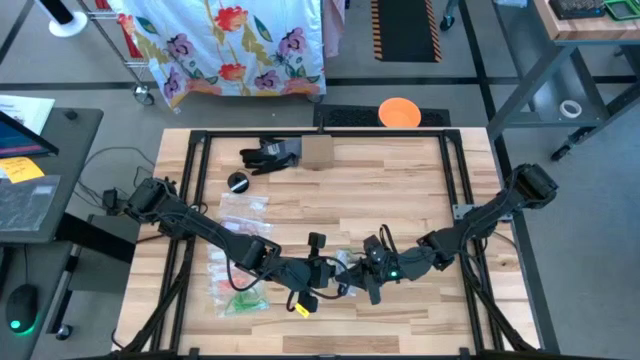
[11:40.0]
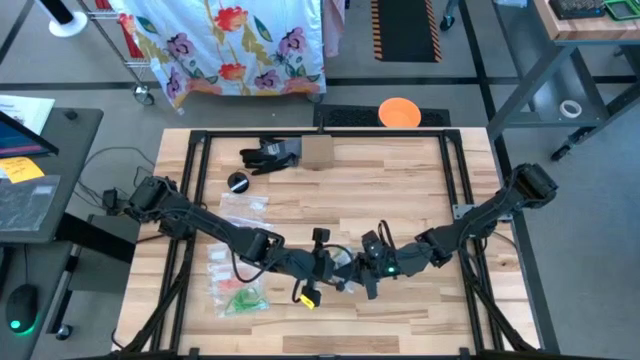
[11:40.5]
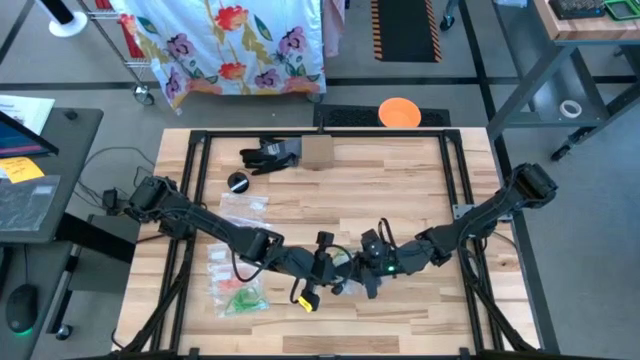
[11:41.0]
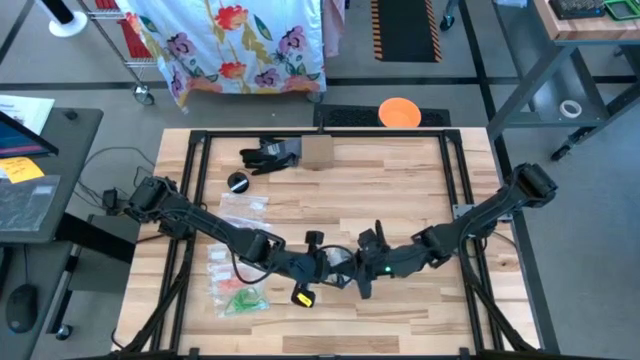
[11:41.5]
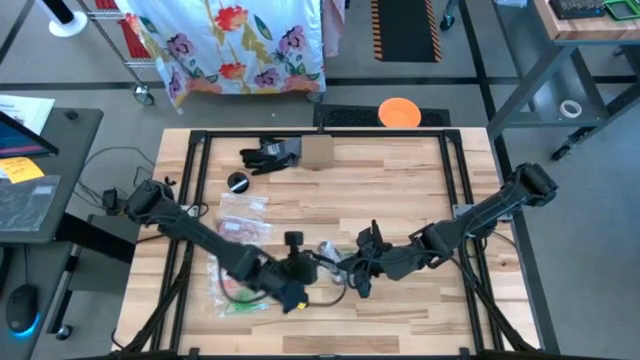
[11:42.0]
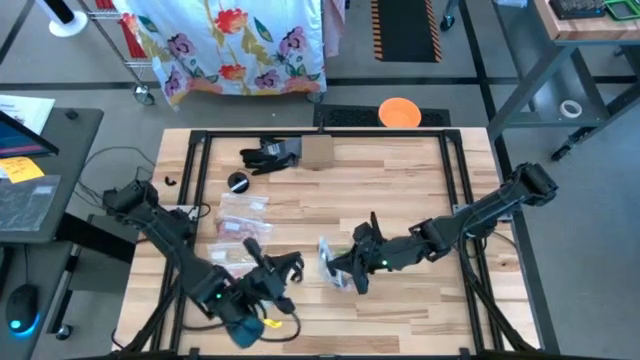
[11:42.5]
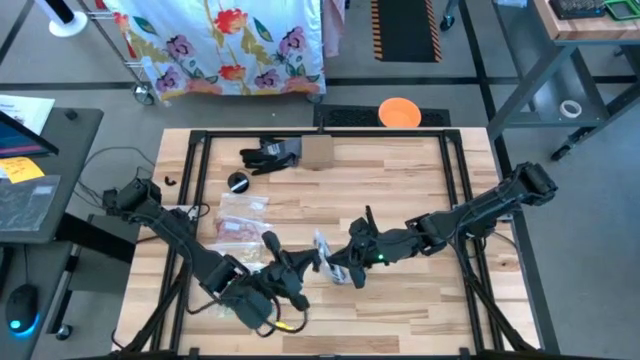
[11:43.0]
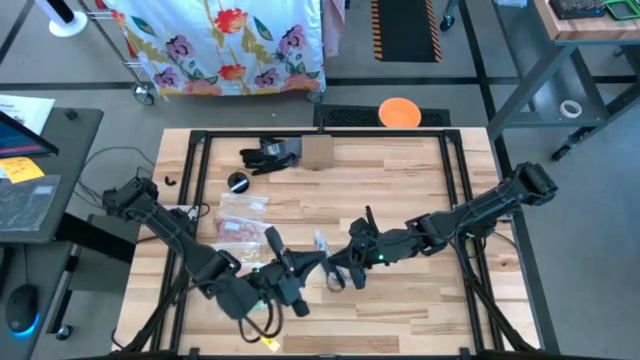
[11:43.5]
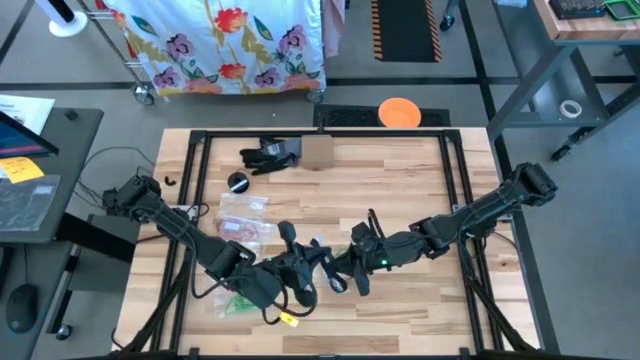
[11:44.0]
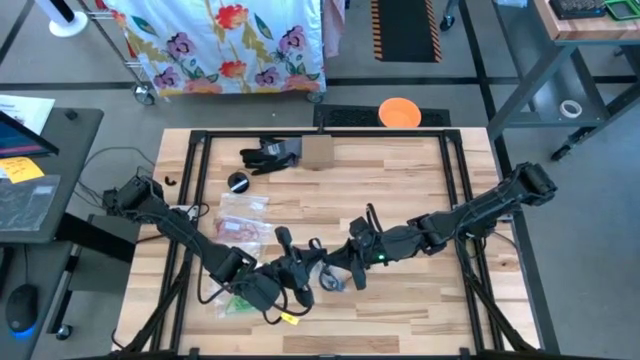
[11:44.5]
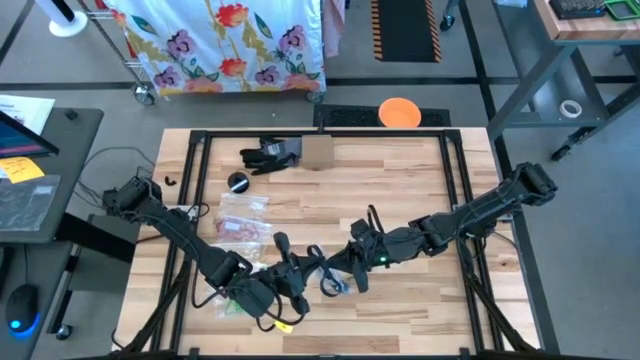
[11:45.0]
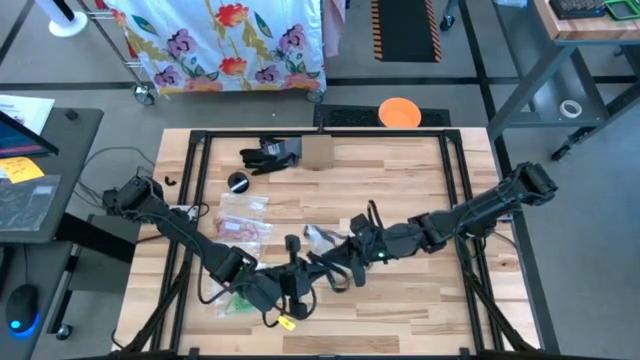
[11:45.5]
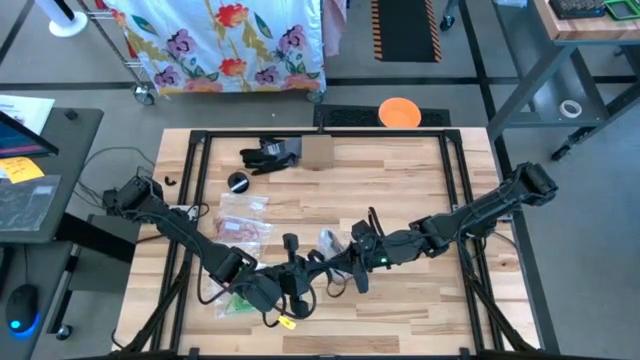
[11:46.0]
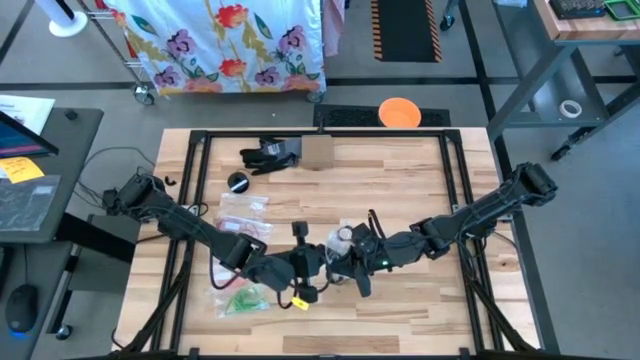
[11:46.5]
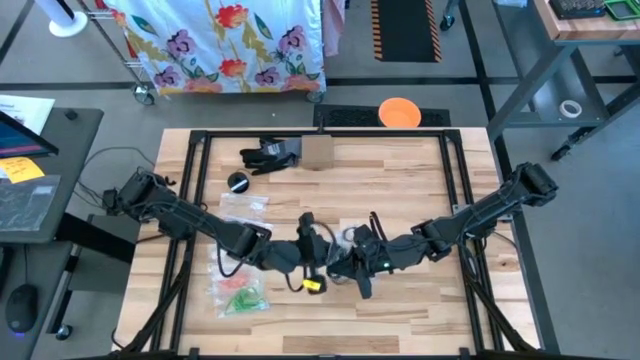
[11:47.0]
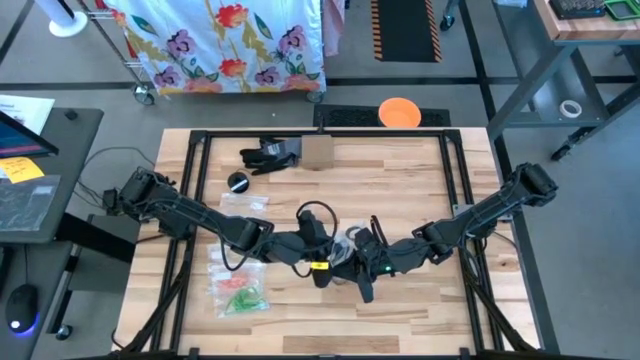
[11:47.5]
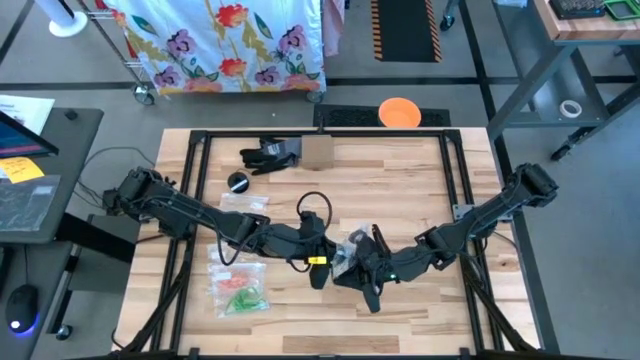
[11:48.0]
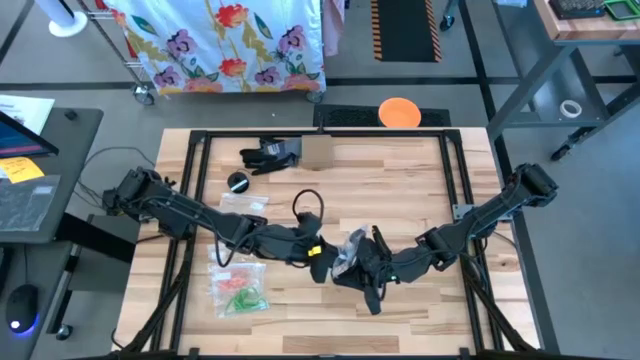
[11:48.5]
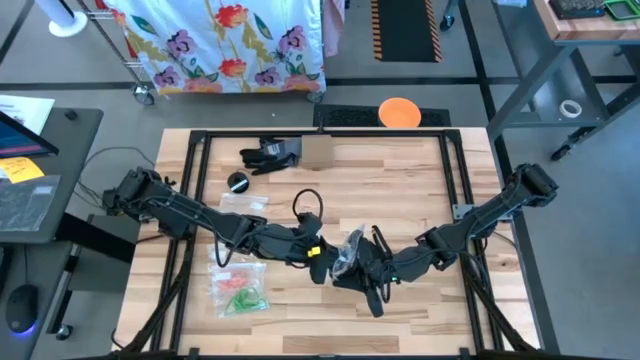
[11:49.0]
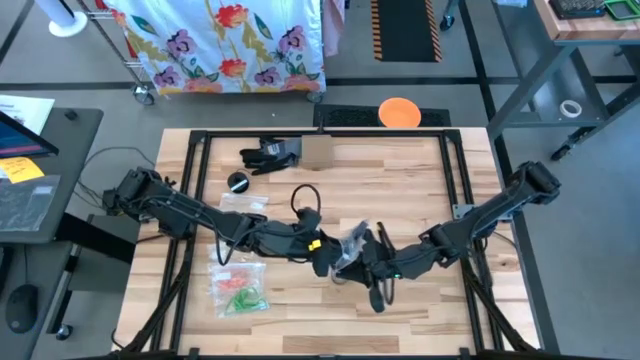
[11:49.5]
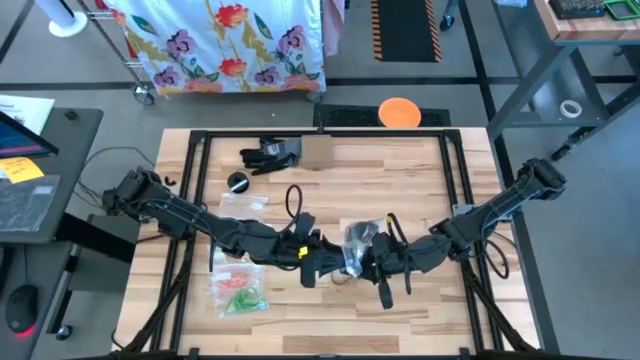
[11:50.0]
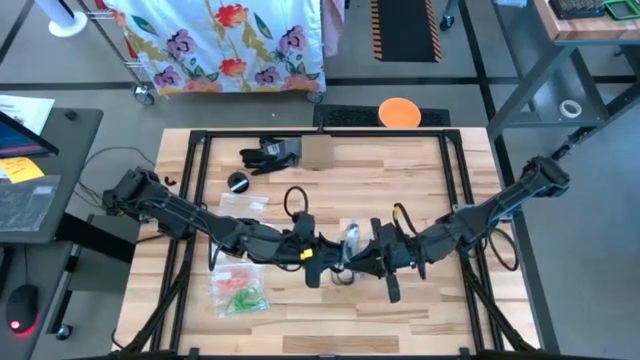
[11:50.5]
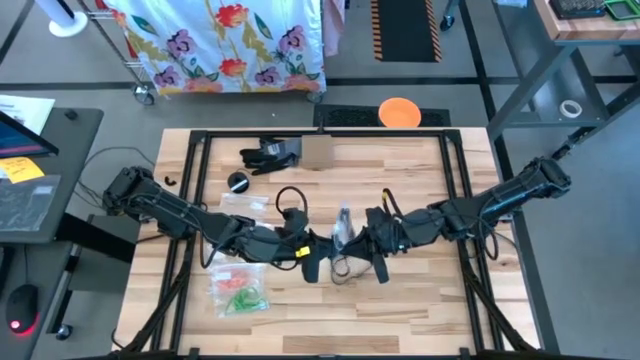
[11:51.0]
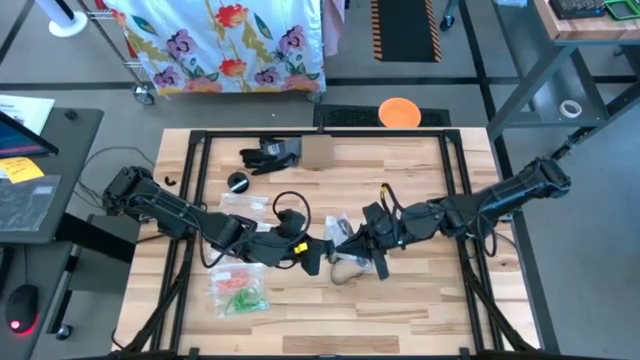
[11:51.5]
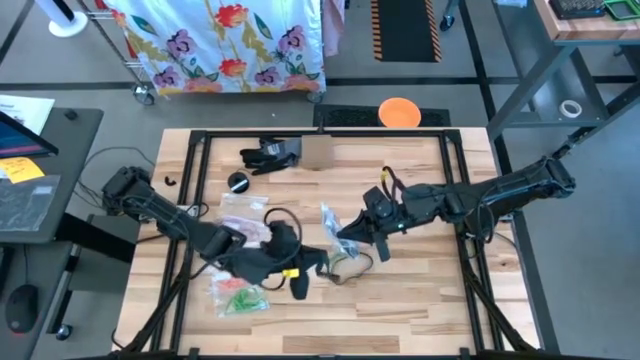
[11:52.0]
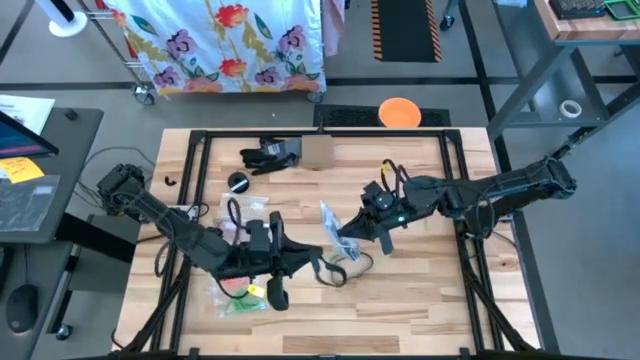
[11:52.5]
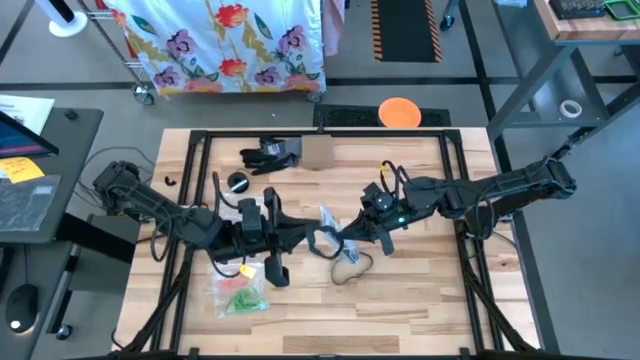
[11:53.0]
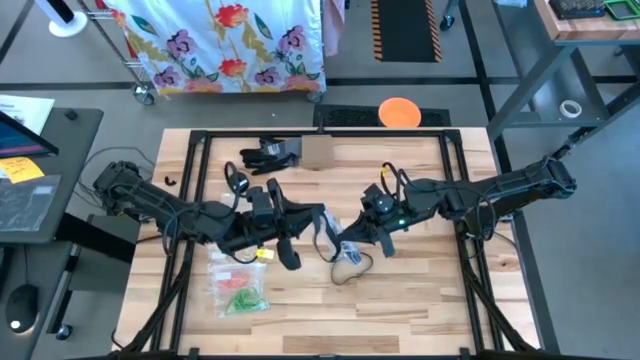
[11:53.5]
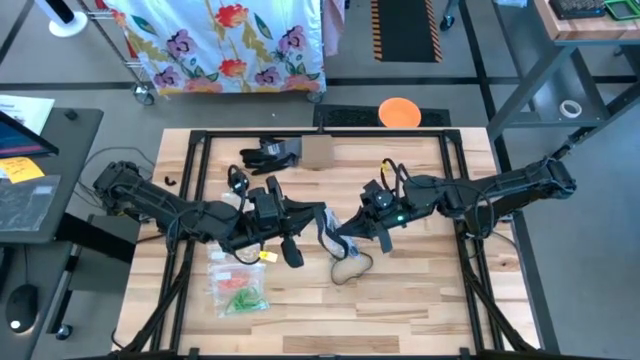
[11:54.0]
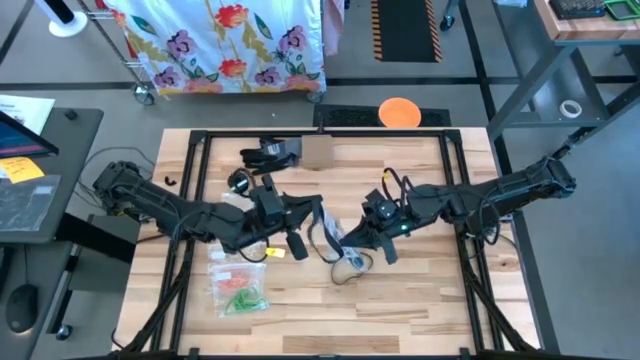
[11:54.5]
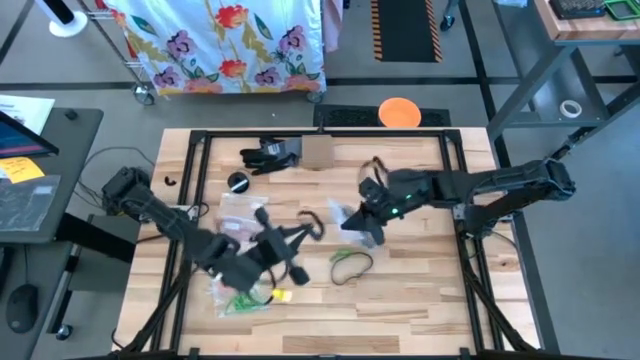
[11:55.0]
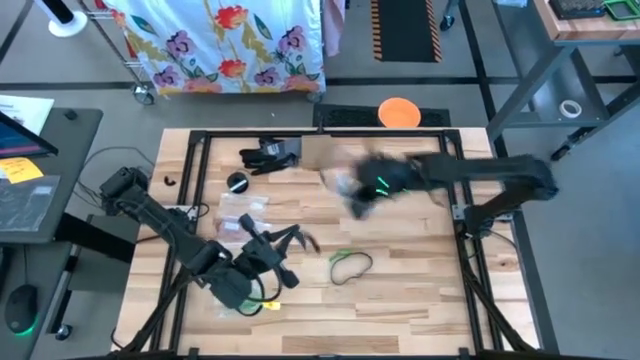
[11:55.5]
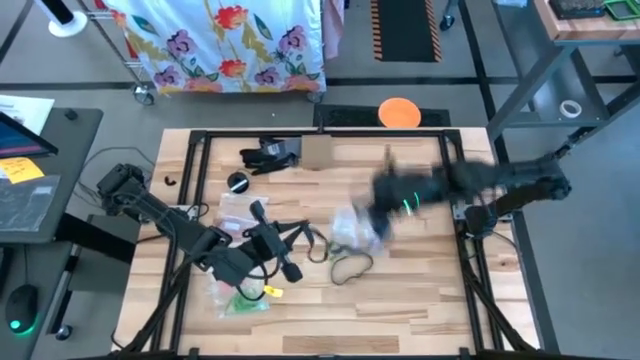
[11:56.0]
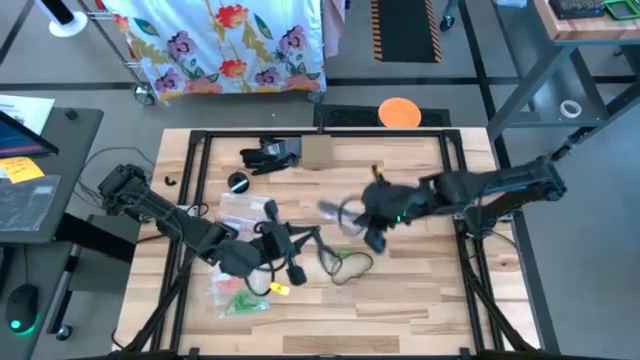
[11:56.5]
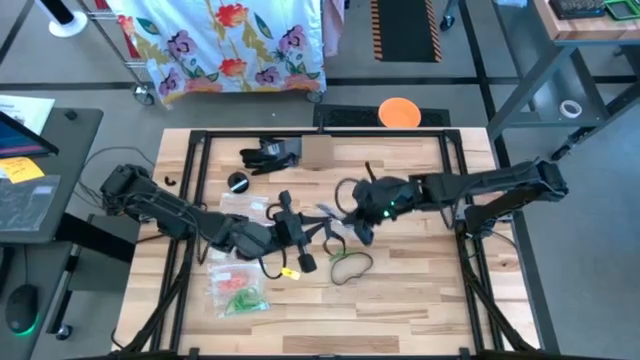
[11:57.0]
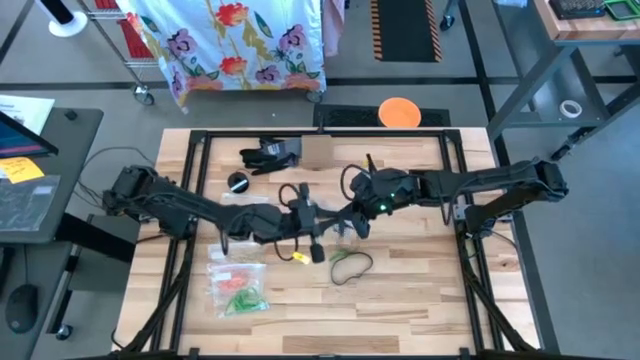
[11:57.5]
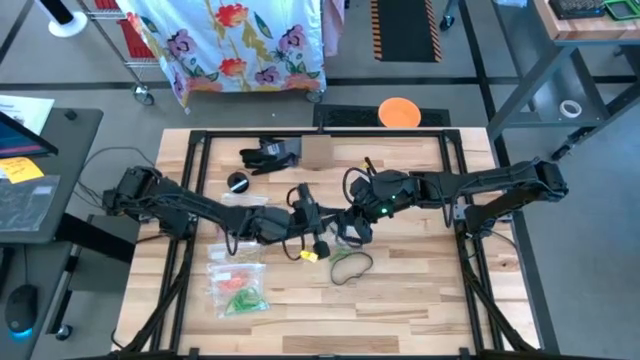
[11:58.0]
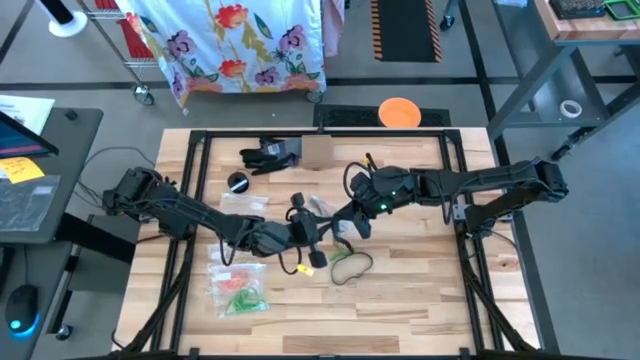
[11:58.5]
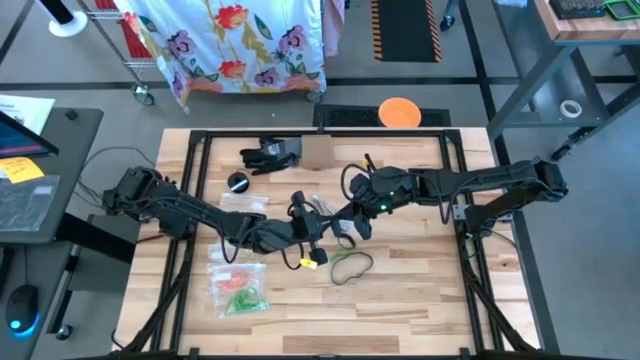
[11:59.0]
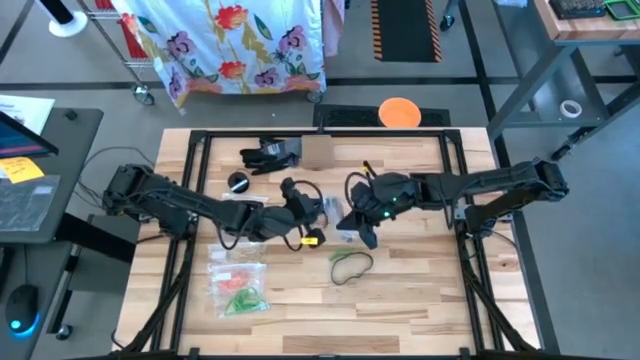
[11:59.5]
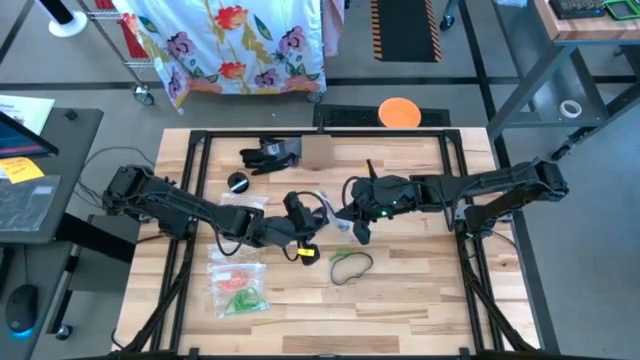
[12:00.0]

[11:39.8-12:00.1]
Task: Sort rubber bands
Put the black rubber band into the transparent zip bag

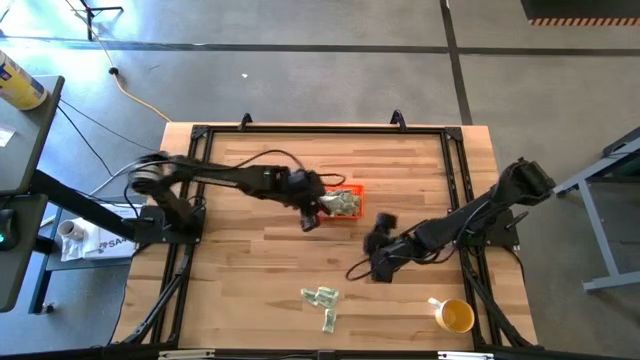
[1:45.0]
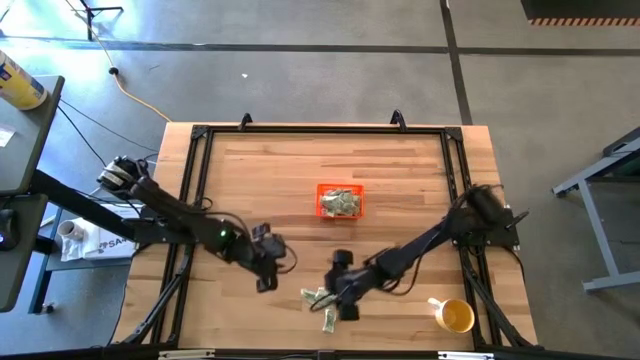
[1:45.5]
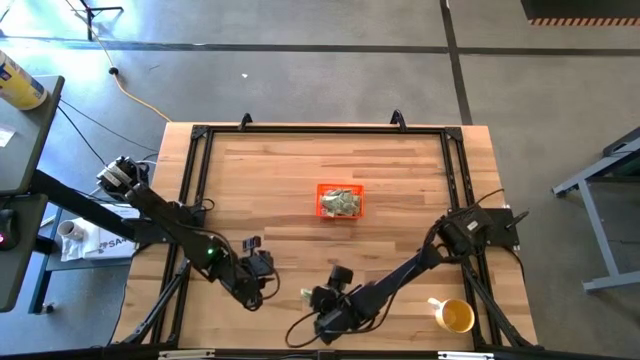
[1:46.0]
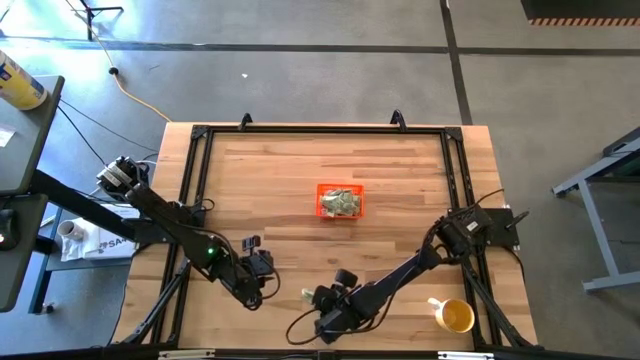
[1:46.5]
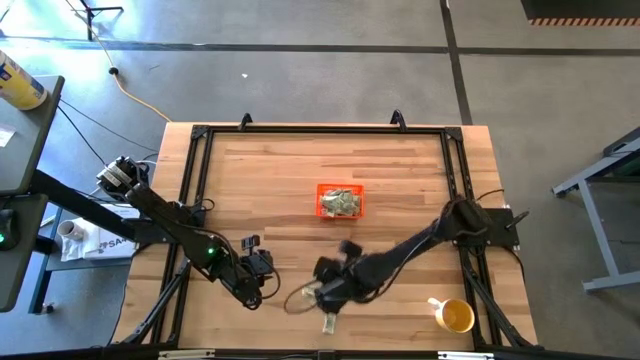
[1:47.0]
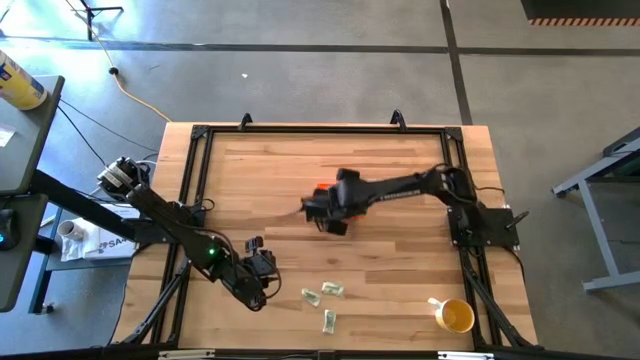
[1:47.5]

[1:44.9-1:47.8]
Task: Pick and place Stevia / Truvia into bins
Put the stevia packet into the orange bin
